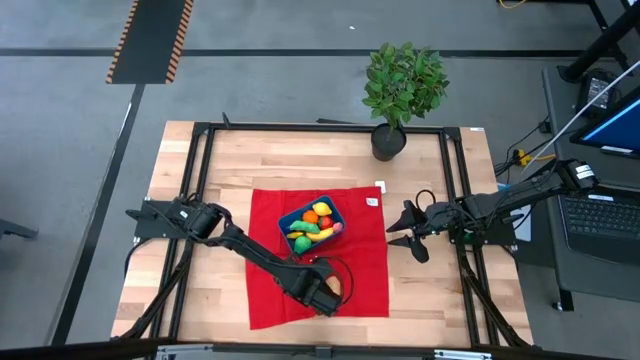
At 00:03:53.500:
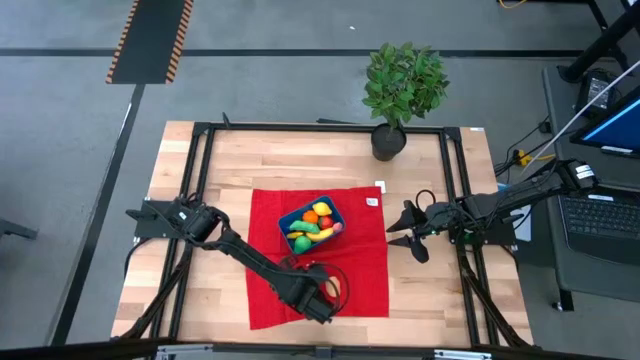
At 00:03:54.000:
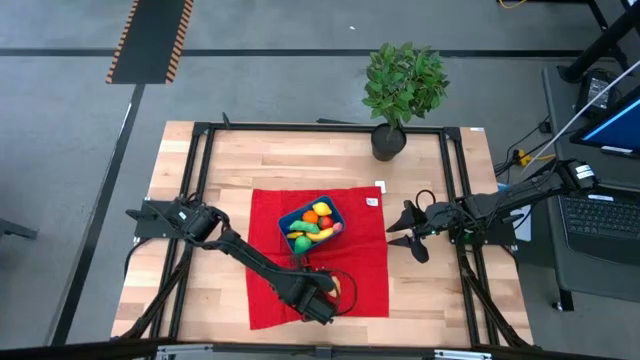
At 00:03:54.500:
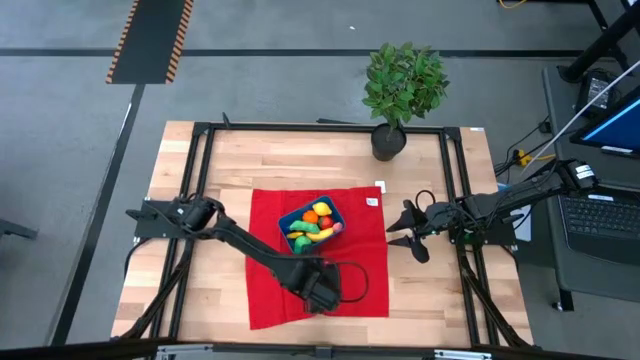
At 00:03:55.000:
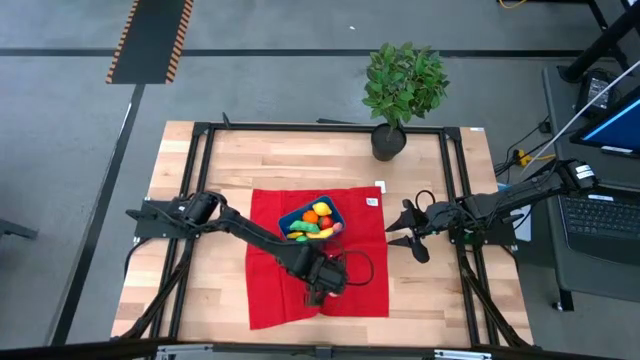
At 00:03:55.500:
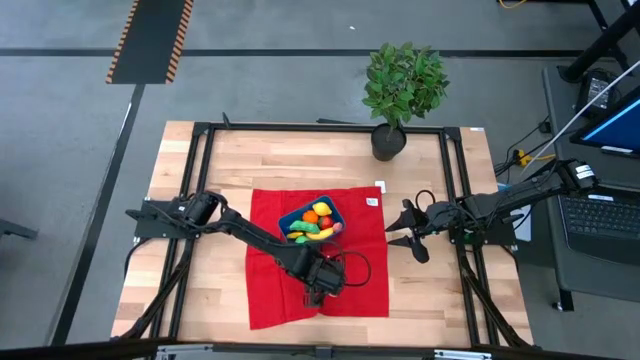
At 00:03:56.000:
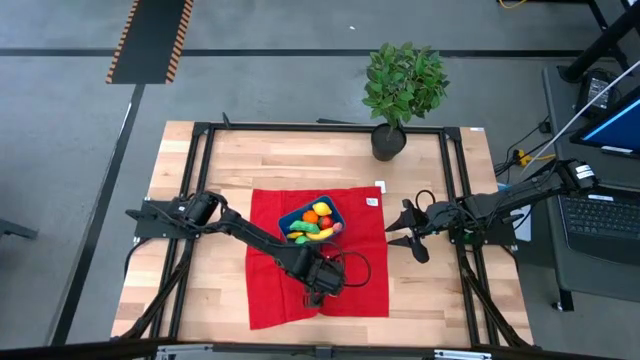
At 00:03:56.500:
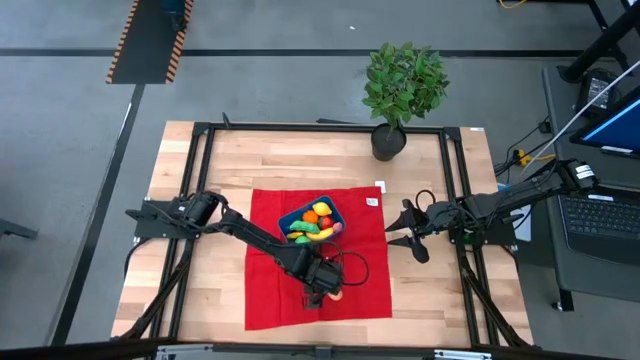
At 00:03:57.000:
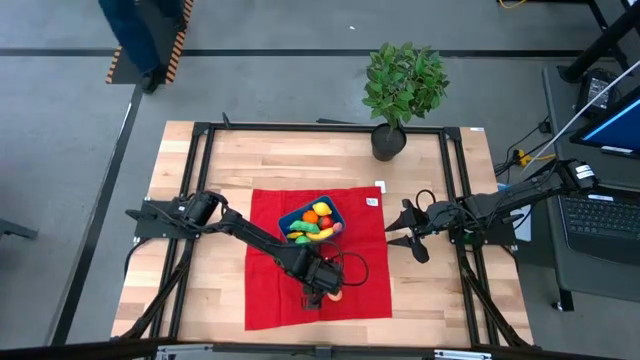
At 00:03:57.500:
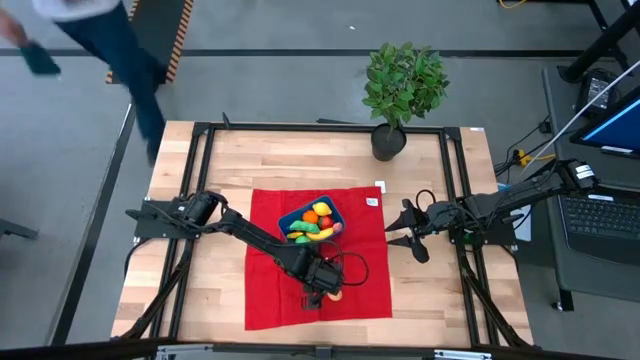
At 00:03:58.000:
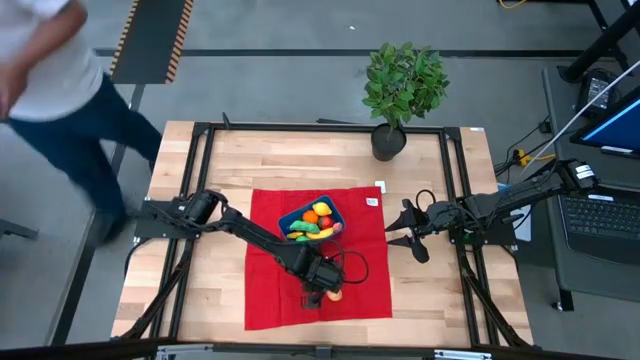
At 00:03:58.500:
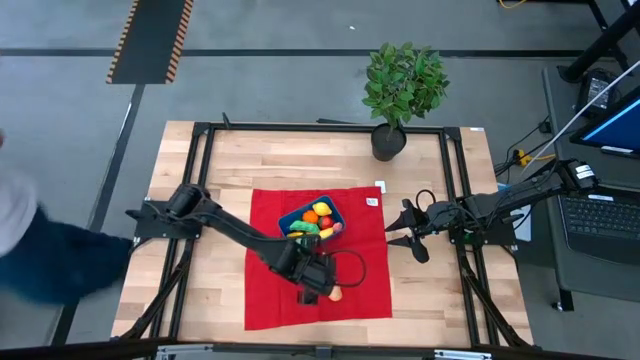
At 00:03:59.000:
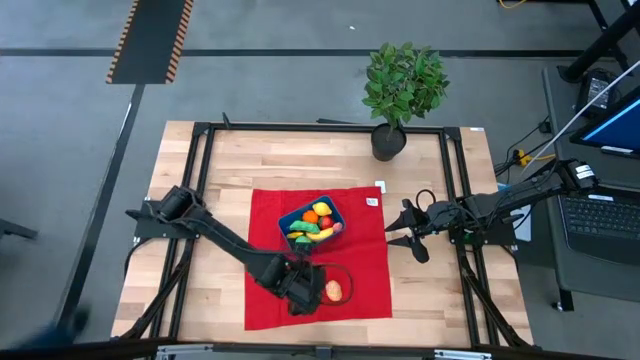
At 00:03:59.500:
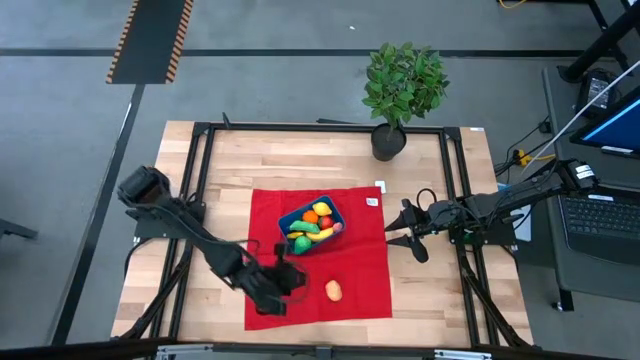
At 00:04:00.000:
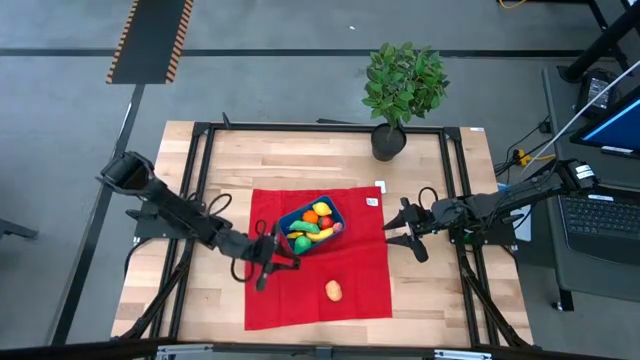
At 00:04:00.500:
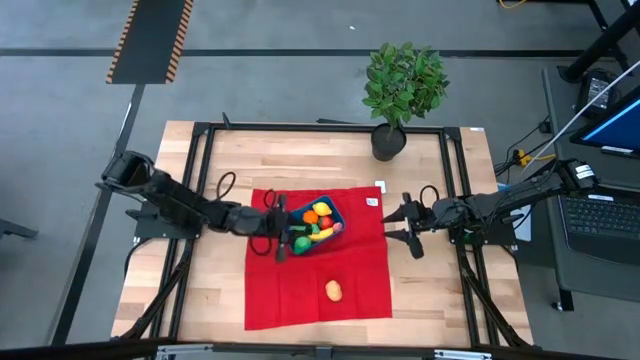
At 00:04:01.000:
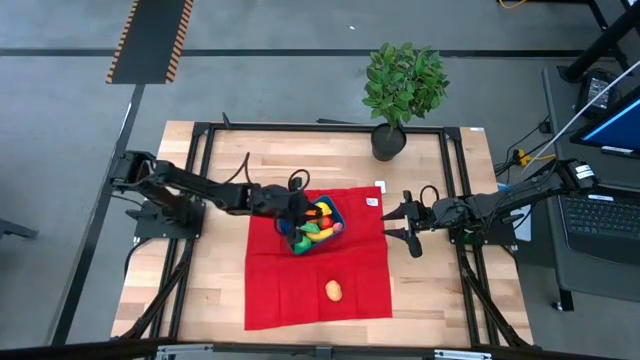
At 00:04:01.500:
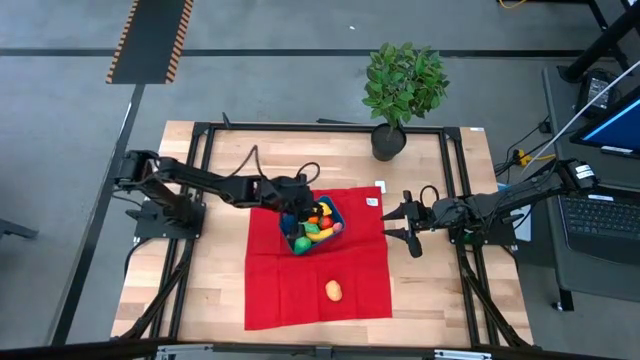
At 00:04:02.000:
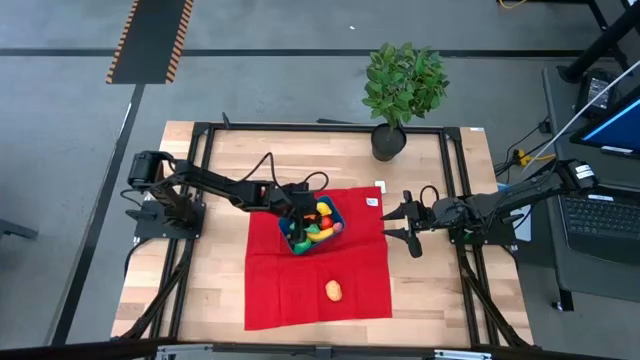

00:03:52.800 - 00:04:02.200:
Task: Pick and placing Produce into tupperware
Put the blackberry into the blue bin

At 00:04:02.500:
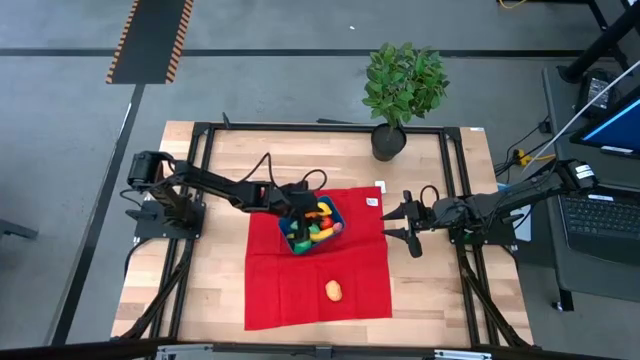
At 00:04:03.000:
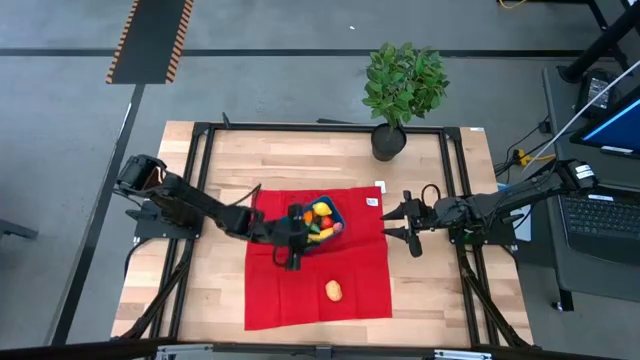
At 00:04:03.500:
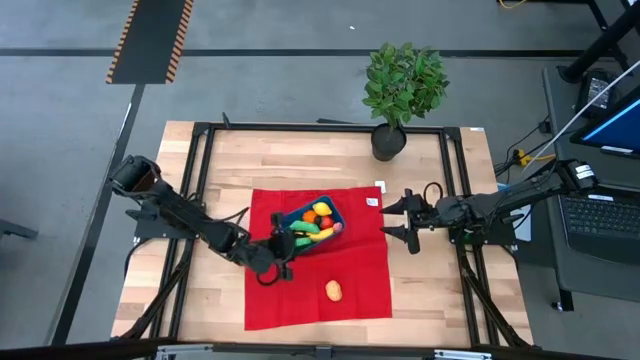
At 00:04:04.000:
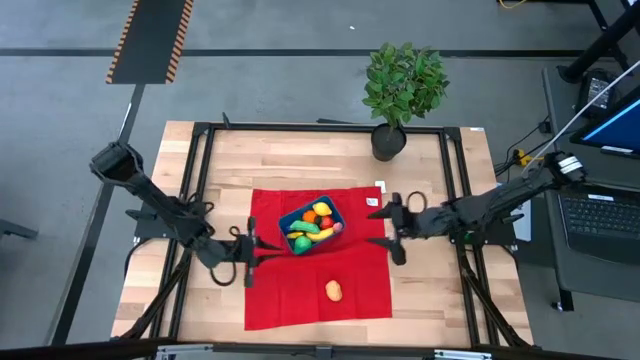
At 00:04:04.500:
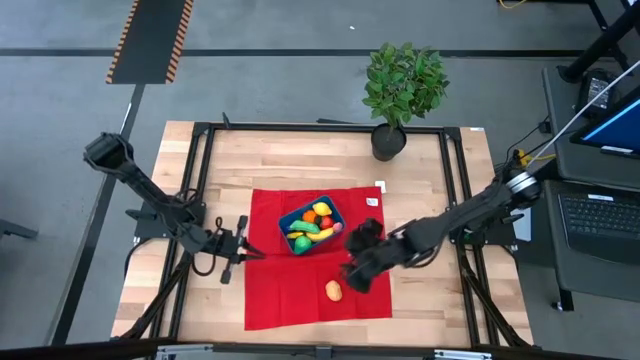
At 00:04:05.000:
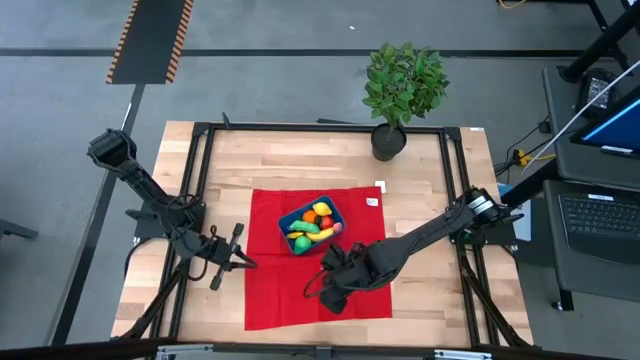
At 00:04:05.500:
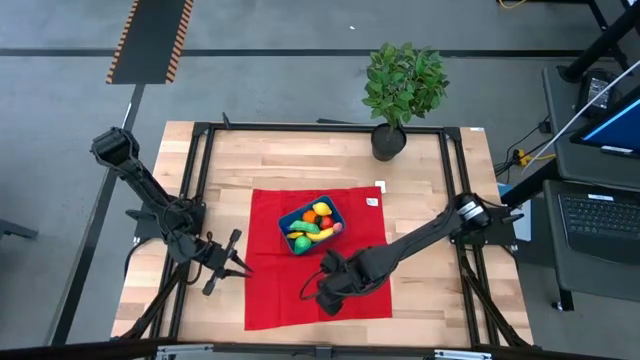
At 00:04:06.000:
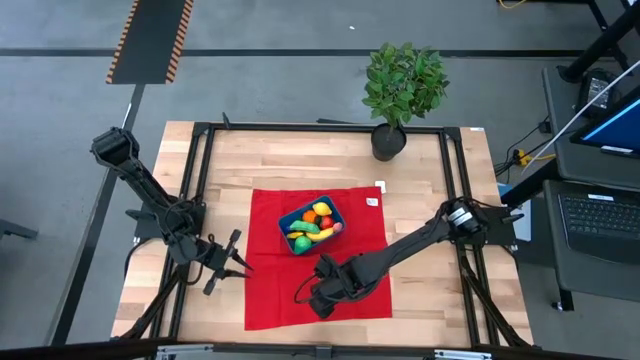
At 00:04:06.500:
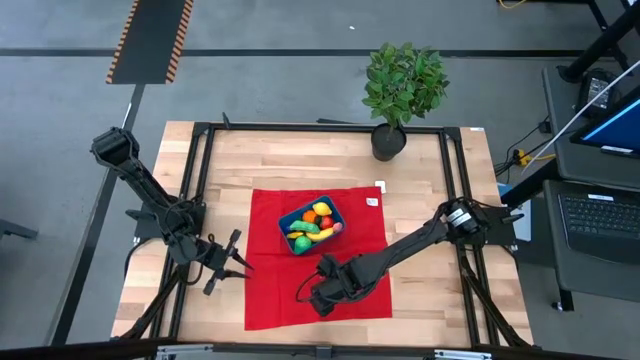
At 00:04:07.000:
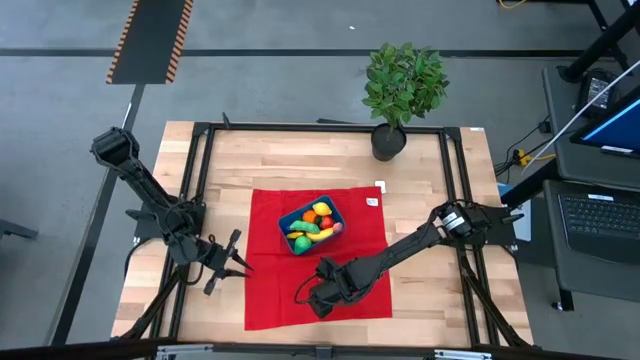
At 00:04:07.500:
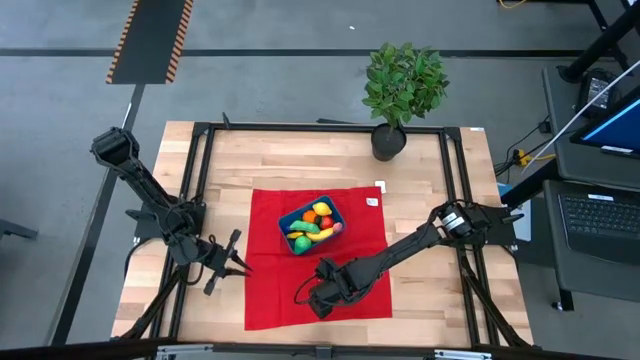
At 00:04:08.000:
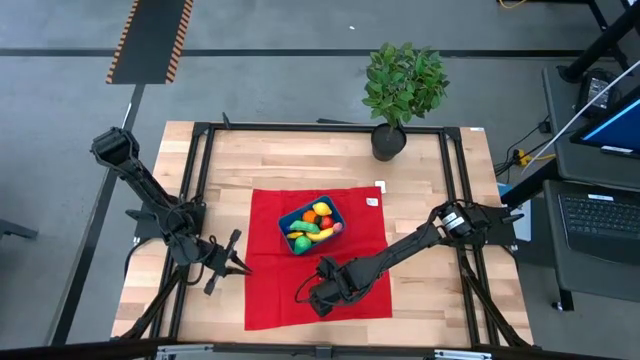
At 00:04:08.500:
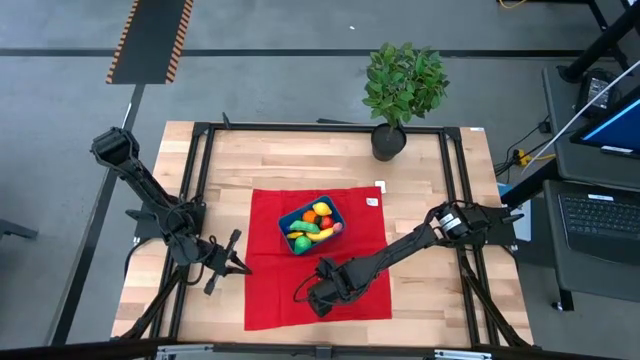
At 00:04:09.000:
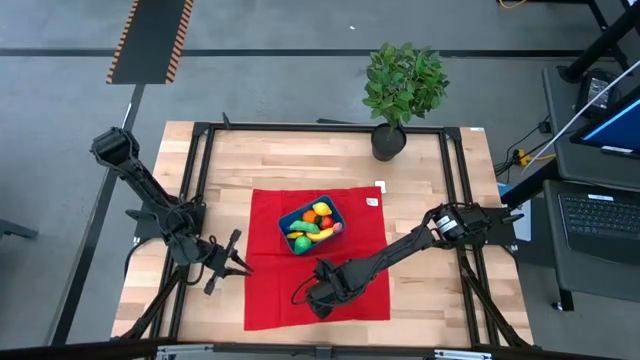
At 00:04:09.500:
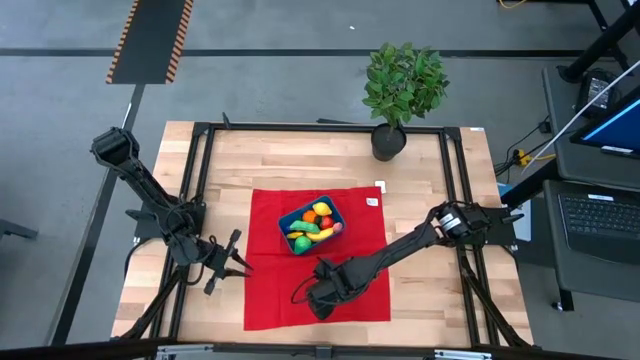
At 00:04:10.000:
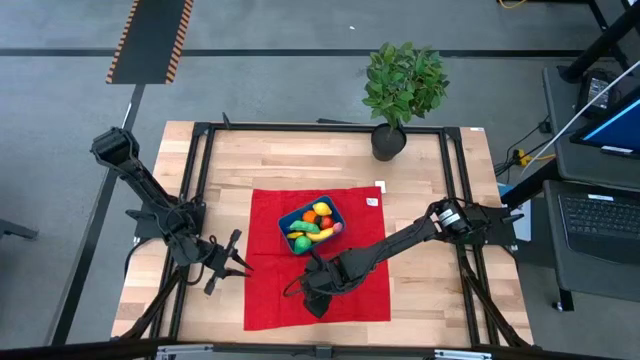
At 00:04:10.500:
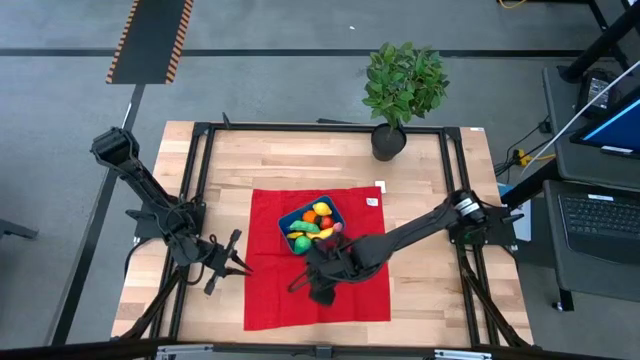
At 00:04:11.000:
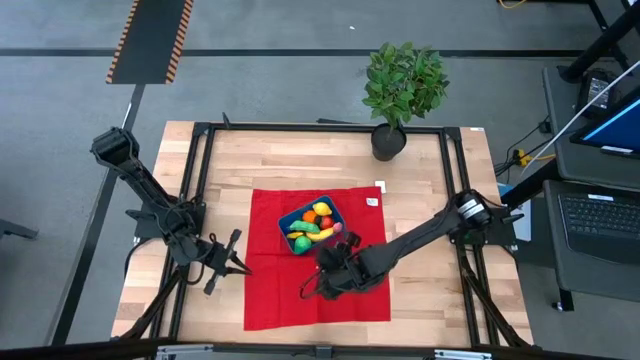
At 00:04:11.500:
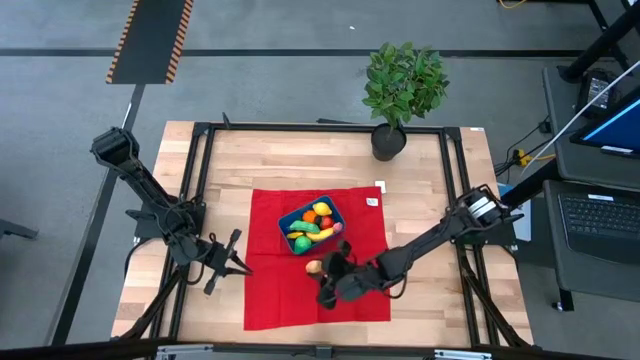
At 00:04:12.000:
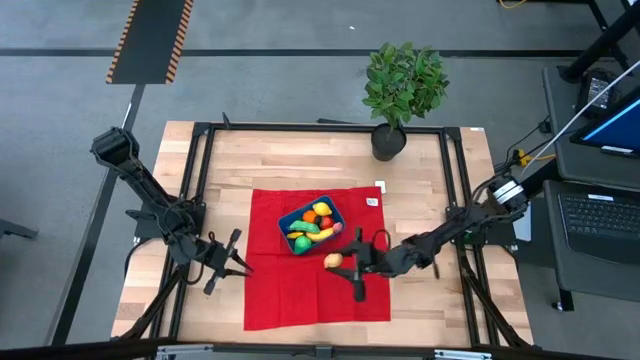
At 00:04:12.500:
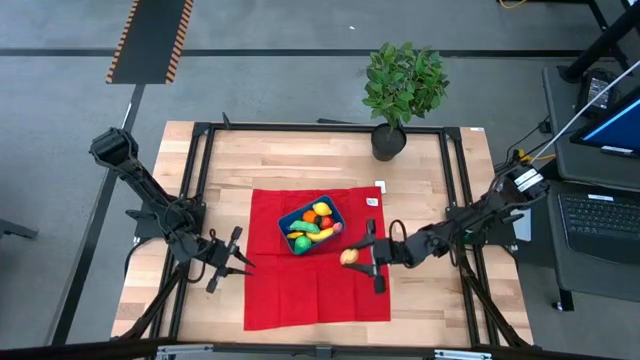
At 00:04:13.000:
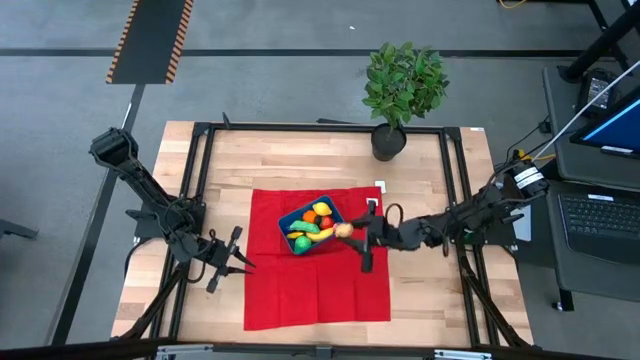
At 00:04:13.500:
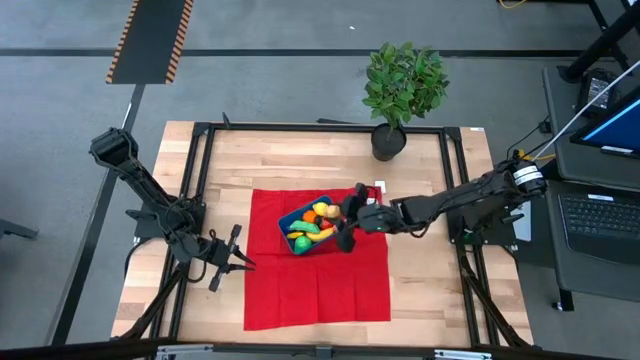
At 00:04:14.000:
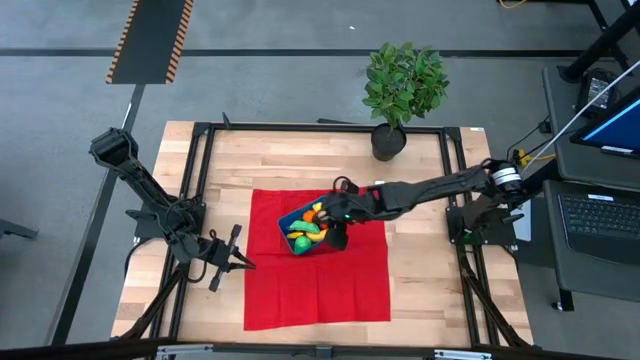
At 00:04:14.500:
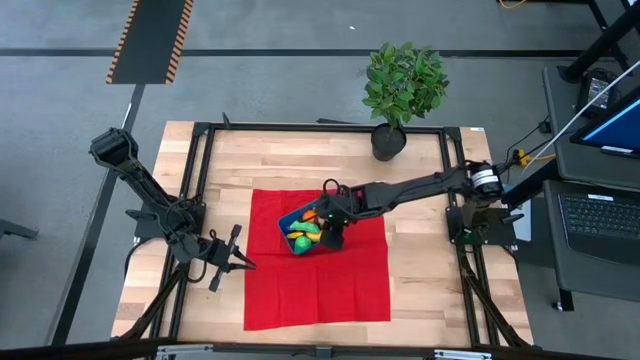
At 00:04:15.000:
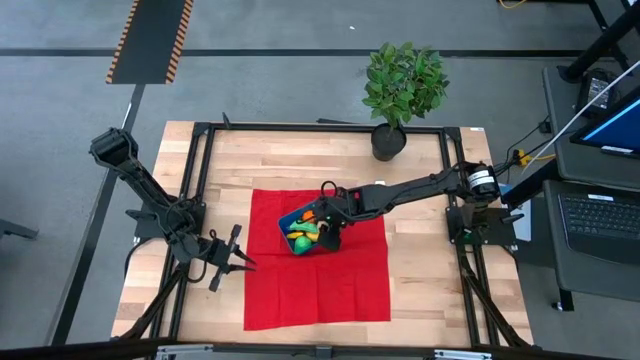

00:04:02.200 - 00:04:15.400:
Put the potato into the blue bin
